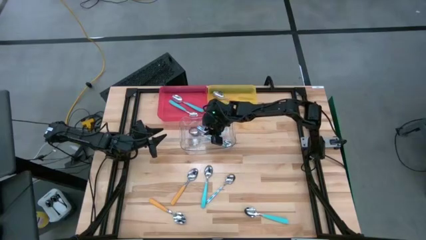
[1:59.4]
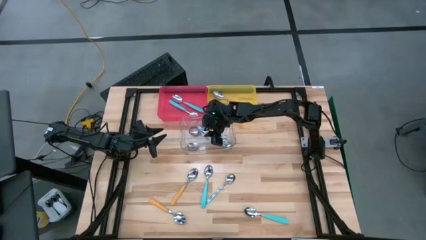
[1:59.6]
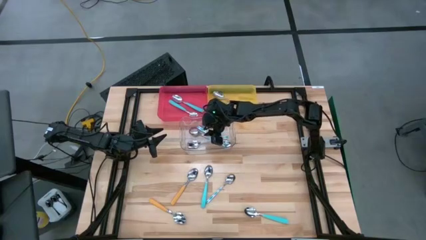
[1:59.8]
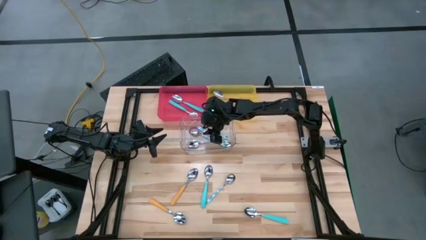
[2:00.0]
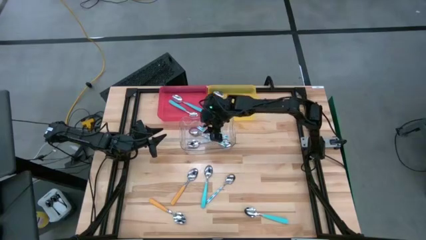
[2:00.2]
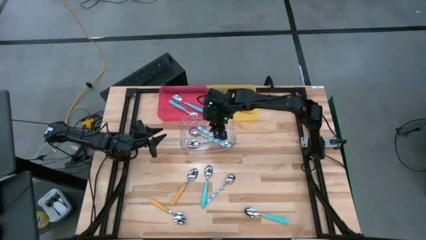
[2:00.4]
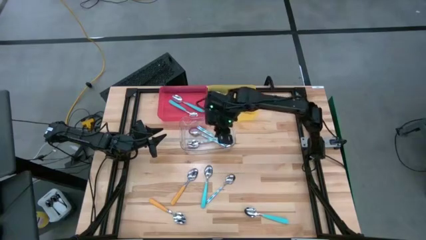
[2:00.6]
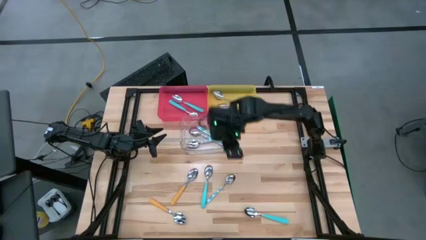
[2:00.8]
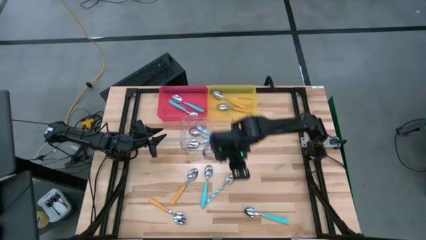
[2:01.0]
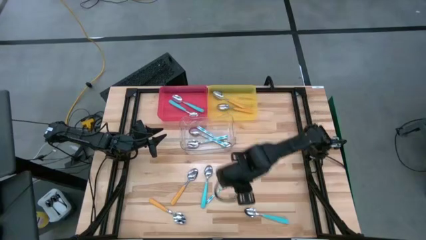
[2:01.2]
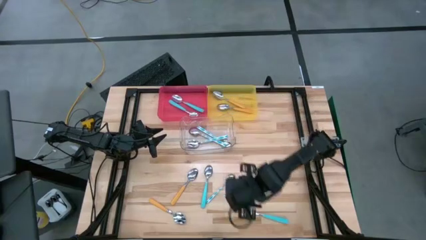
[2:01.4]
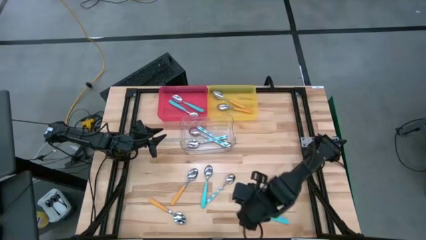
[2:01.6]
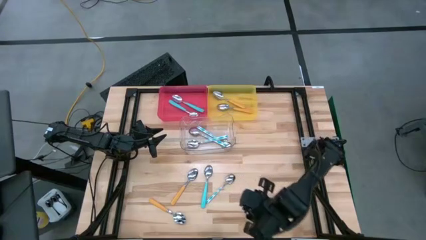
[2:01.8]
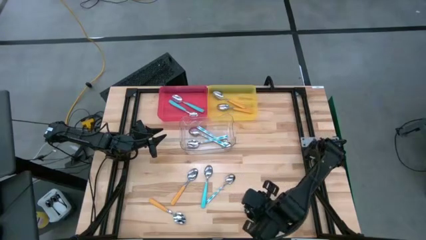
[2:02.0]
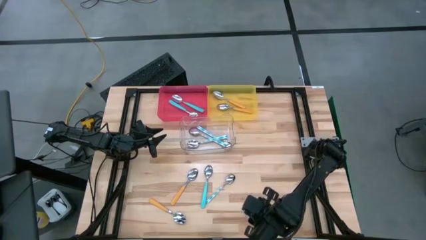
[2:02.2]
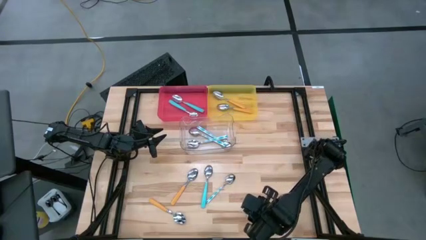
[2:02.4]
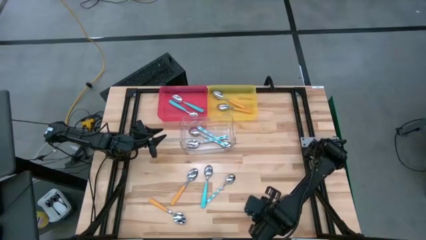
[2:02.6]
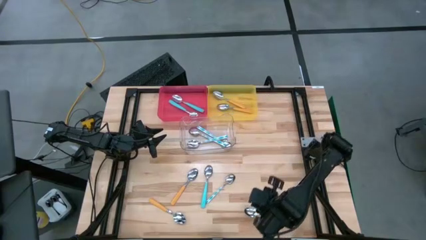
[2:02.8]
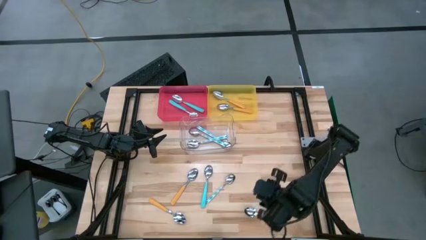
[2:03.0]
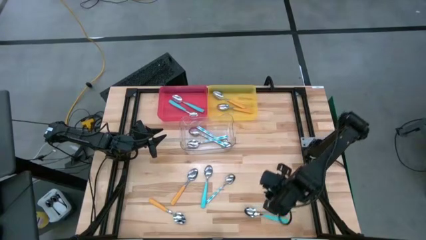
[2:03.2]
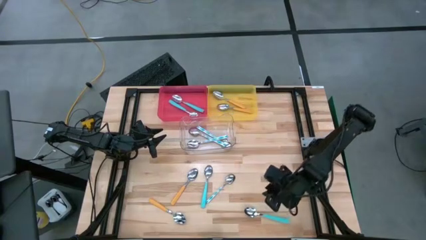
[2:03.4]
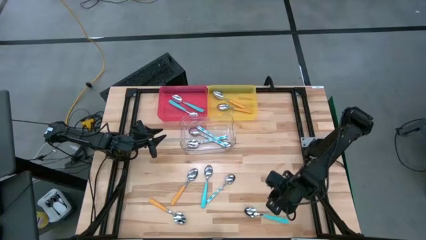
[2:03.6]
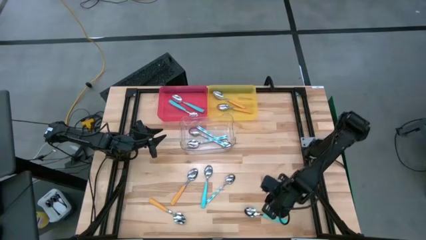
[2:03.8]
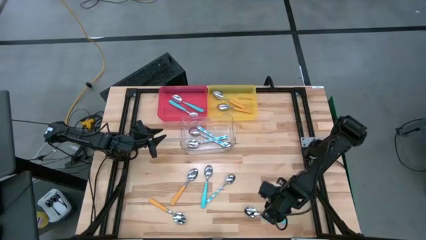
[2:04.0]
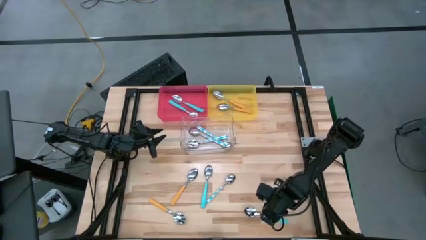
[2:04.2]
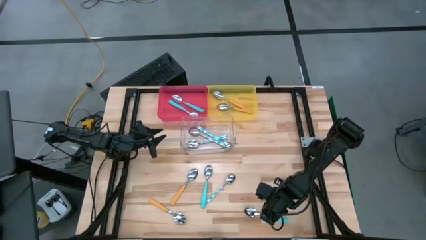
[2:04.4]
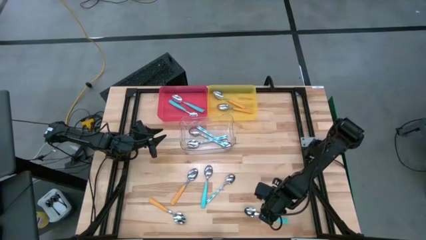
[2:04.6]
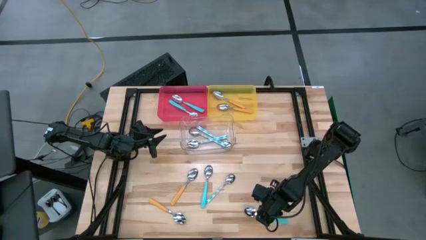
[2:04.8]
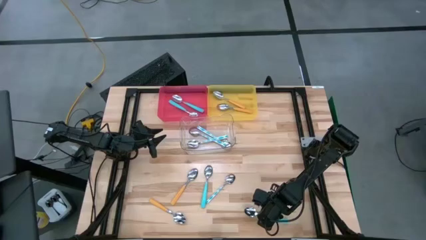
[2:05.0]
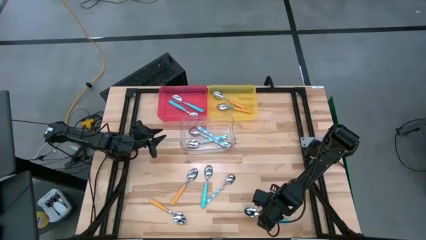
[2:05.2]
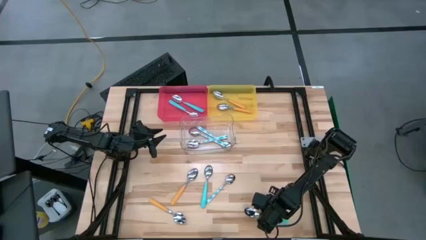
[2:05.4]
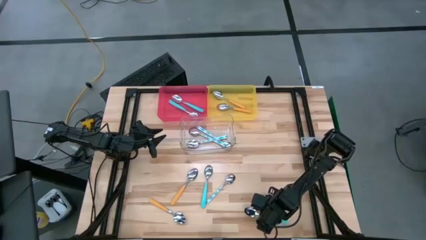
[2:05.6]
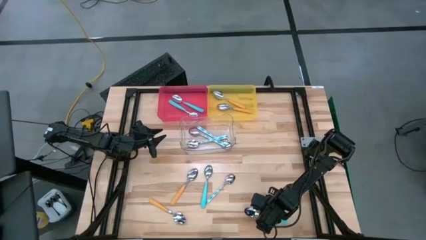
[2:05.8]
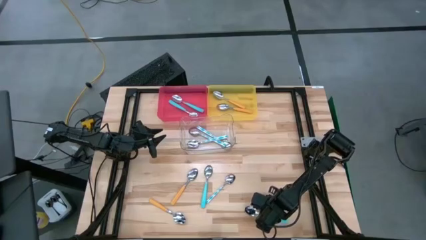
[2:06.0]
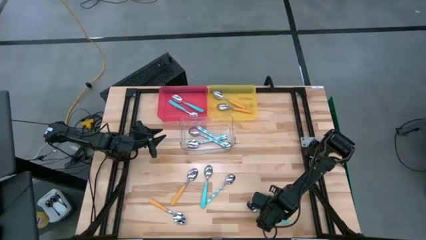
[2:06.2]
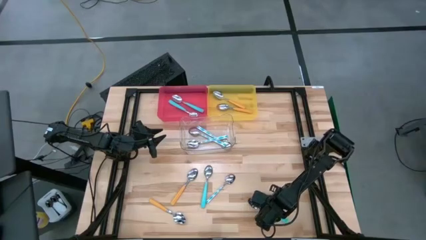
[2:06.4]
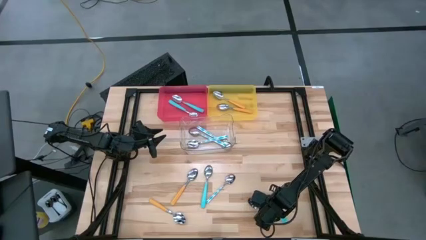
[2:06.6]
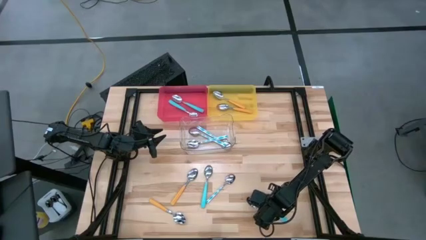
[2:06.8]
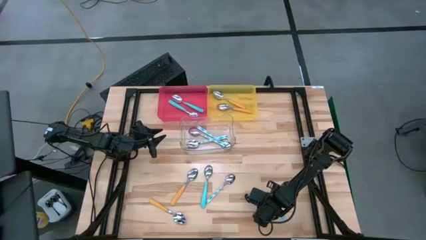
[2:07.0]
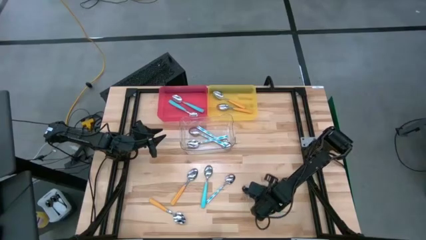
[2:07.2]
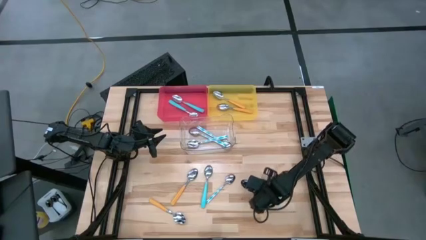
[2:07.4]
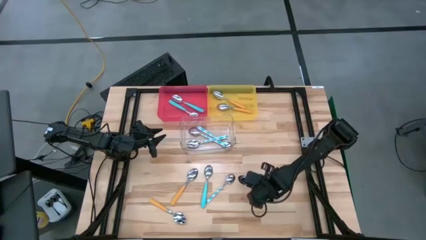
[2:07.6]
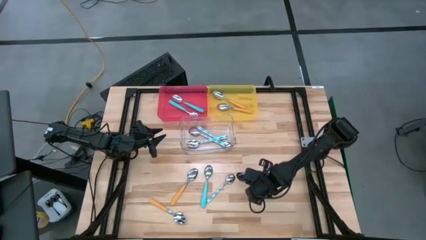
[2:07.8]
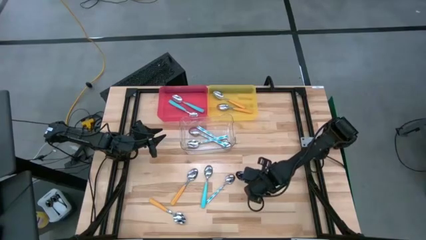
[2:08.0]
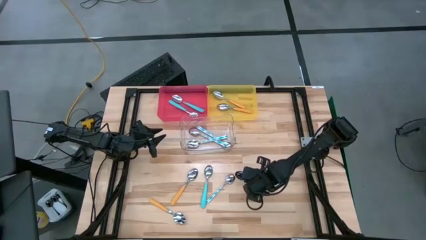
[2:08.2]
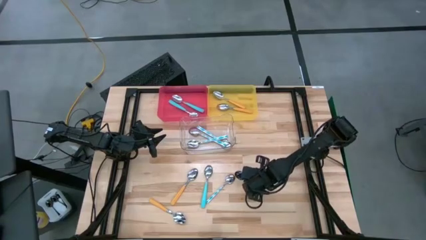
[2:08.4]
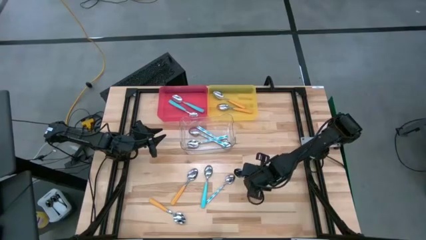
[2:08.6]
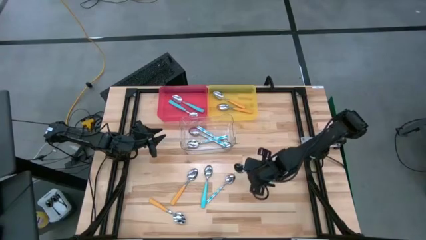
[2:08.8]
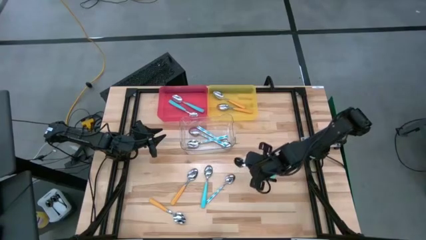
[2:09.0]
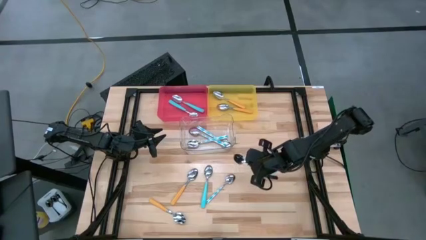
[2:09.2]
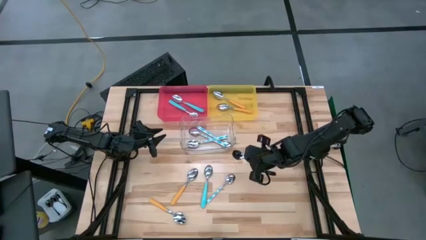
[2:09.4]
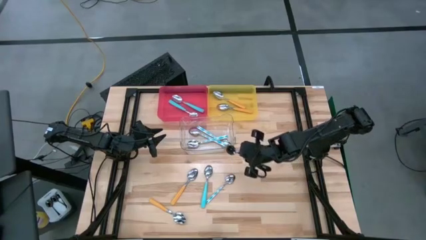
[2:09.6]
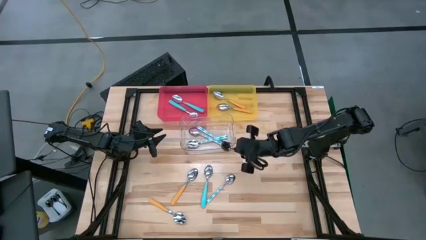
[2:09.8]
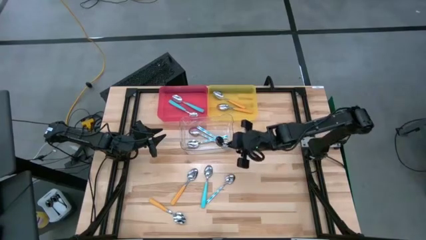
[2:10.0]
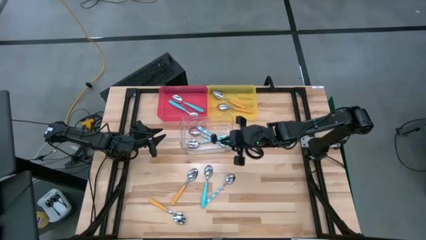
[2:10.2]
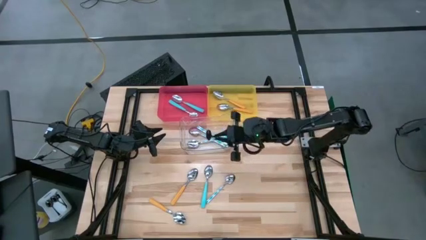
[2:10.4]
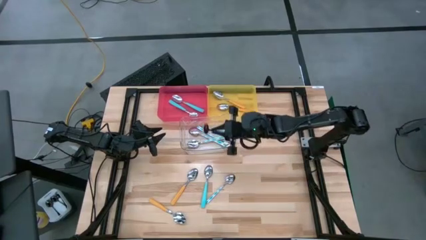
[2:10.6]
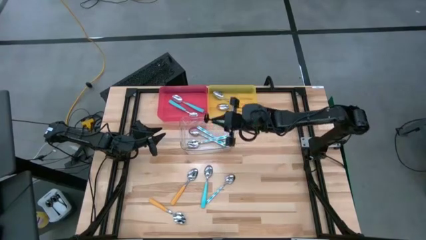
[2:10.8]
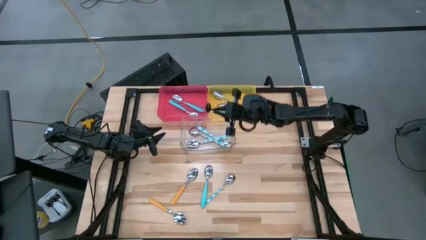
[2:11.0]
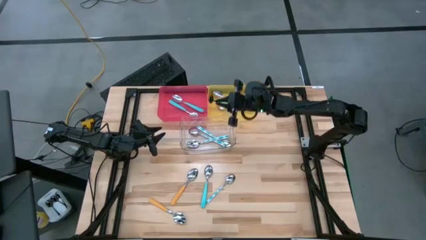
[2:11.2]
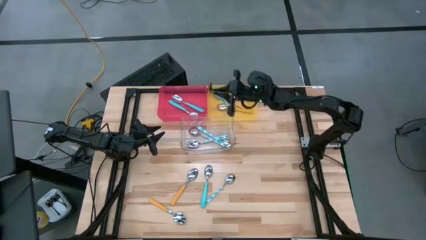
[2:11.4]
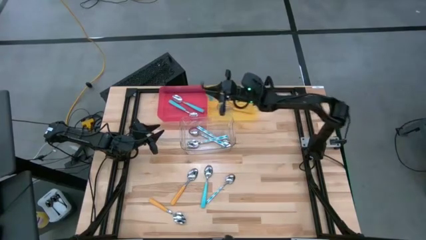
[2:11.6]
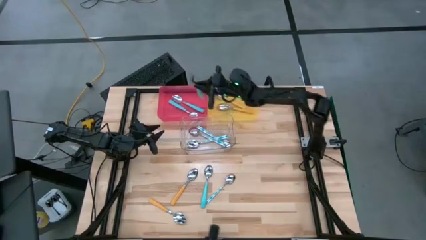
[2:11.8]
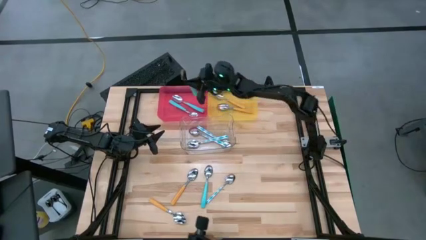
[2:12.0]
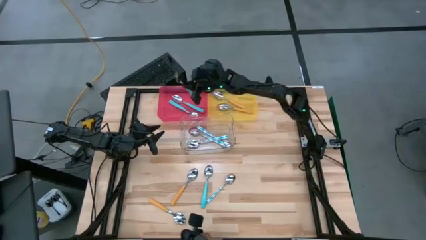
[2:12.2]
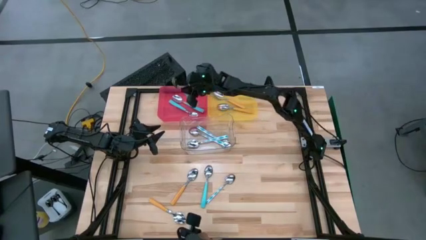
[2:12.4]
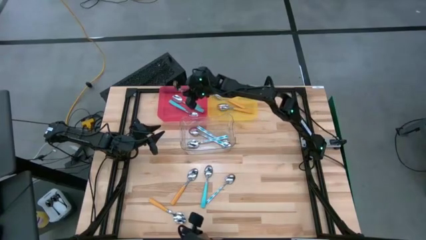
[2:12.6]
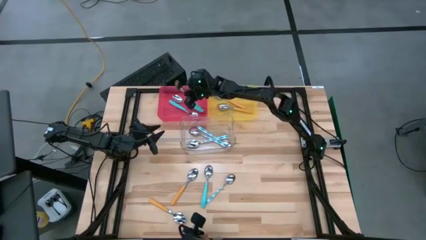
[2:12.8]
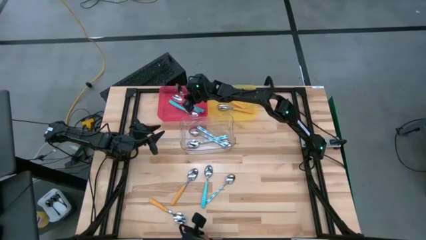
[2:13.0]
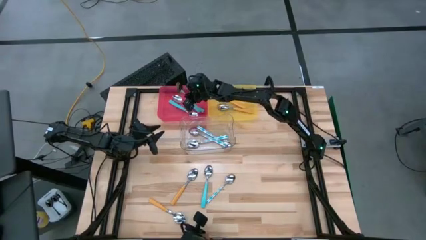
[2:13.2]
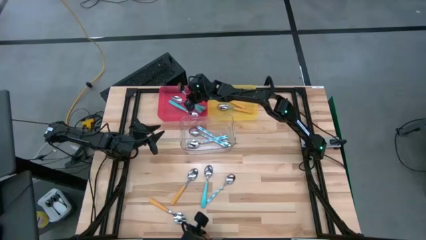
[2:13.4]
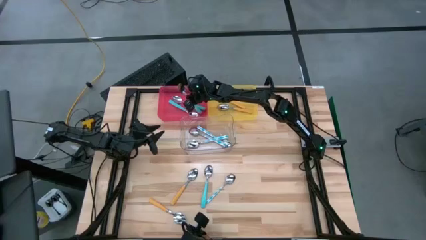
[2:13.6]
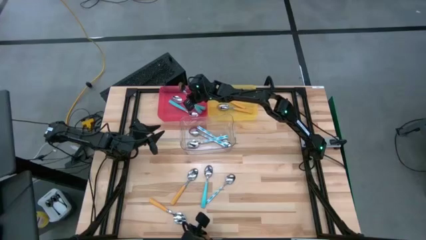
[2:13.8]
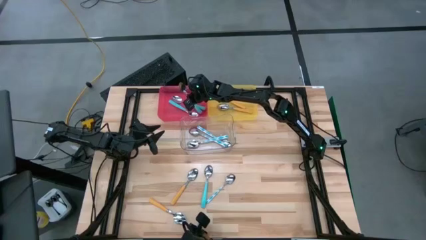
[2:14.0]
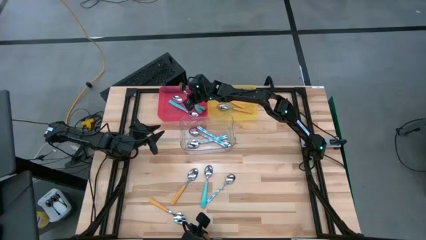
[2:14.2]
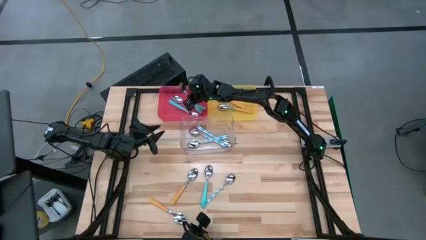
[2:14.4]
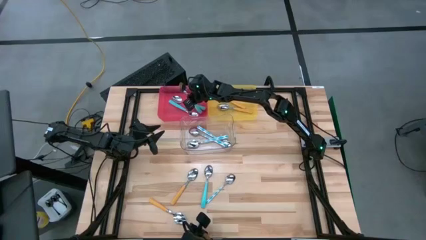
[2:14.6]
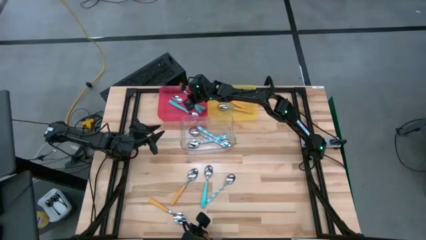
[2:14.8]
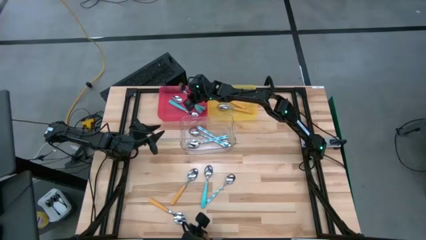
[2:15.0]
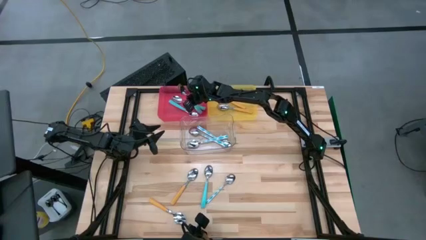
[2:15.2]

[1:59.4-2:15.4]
Task: Sort silverware by color (type)
Put the light green spoon into the red bin
